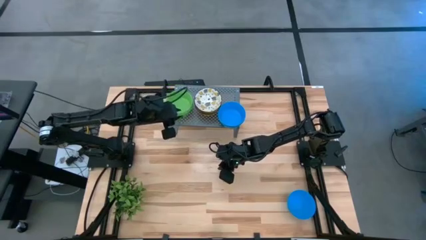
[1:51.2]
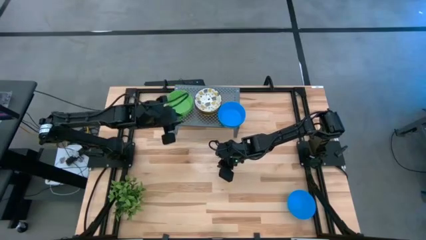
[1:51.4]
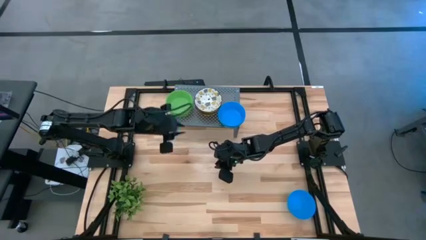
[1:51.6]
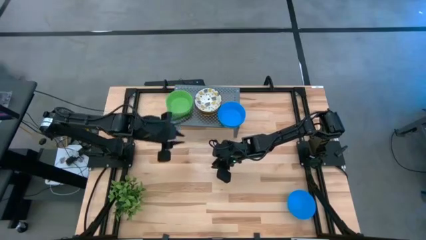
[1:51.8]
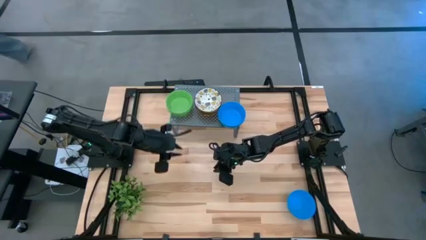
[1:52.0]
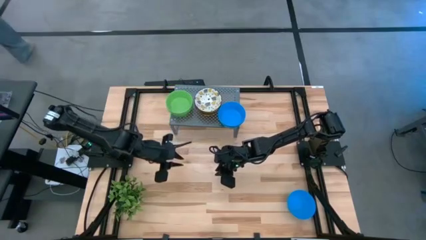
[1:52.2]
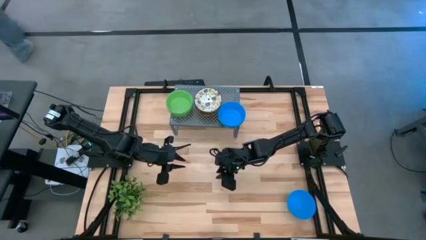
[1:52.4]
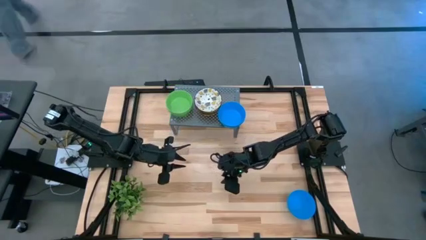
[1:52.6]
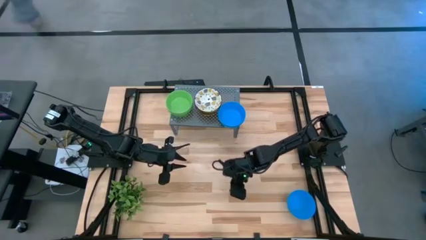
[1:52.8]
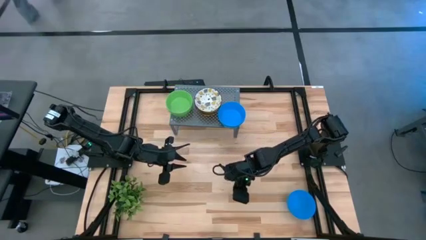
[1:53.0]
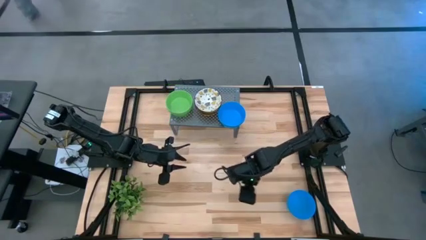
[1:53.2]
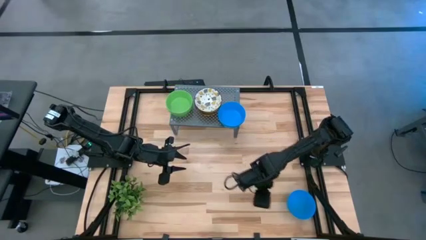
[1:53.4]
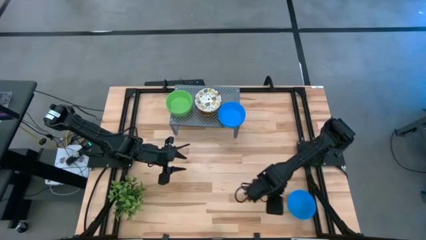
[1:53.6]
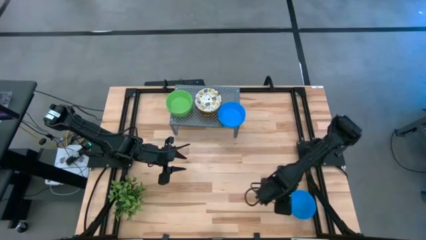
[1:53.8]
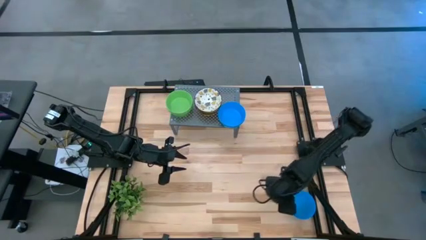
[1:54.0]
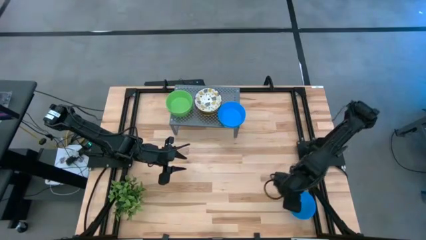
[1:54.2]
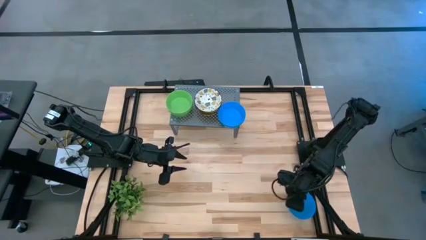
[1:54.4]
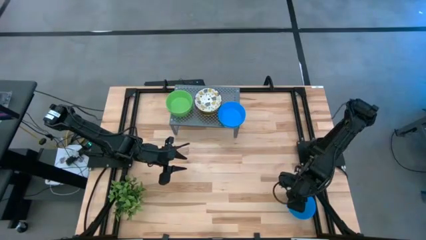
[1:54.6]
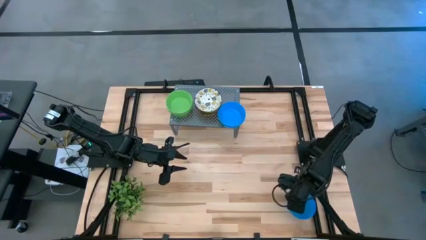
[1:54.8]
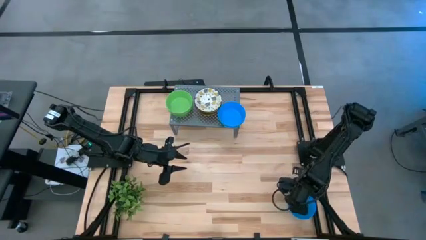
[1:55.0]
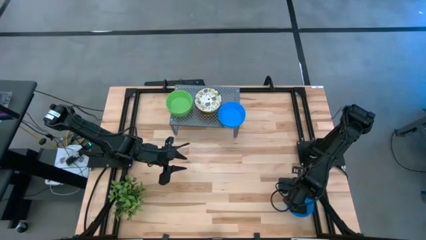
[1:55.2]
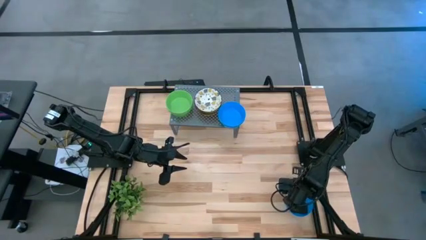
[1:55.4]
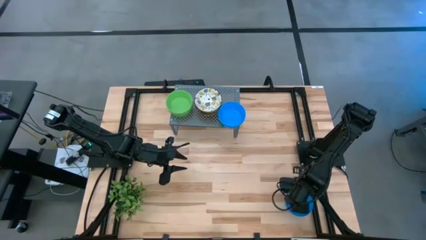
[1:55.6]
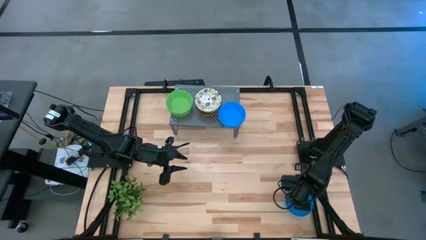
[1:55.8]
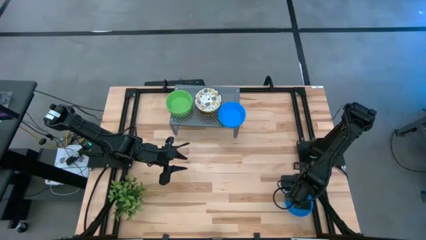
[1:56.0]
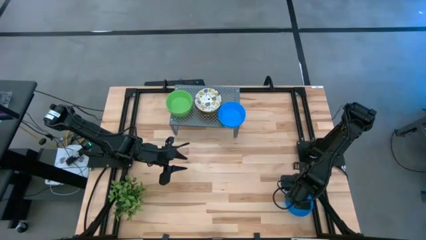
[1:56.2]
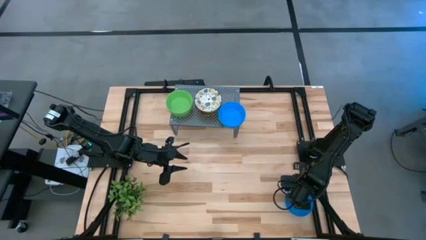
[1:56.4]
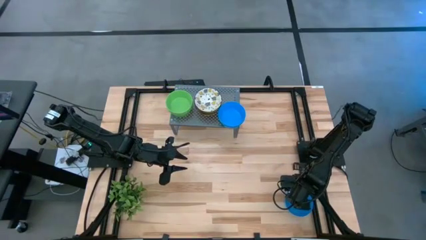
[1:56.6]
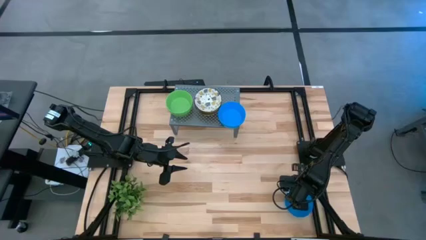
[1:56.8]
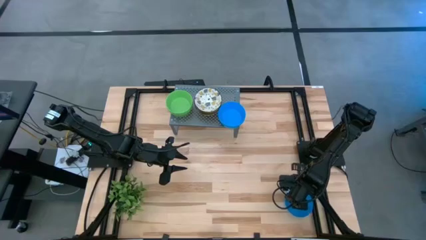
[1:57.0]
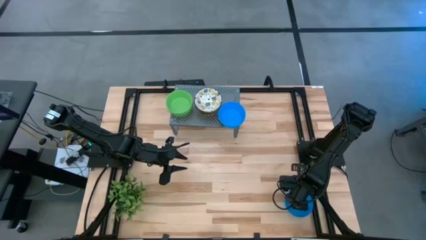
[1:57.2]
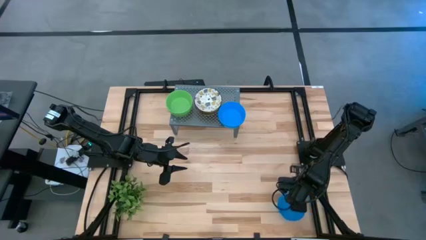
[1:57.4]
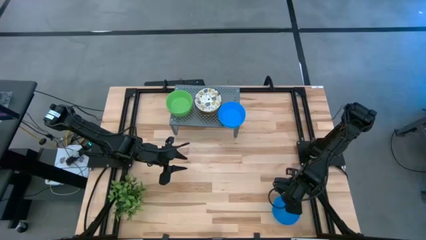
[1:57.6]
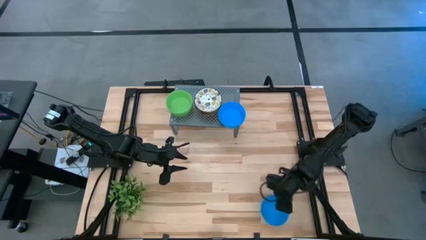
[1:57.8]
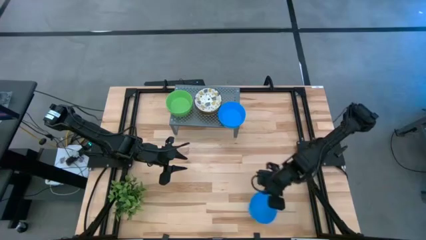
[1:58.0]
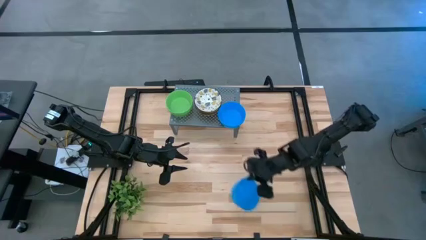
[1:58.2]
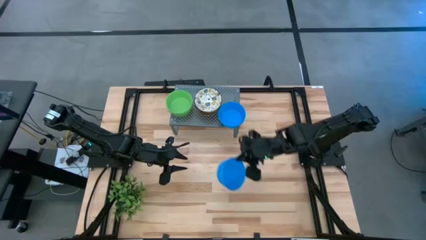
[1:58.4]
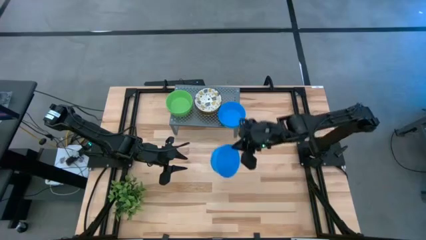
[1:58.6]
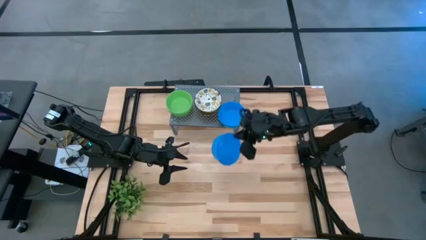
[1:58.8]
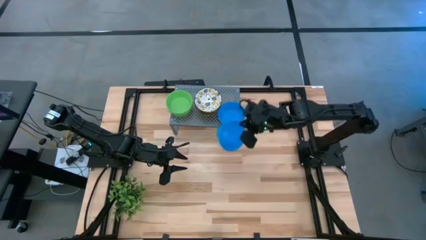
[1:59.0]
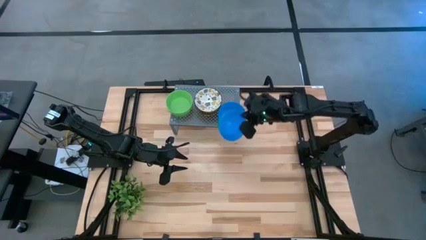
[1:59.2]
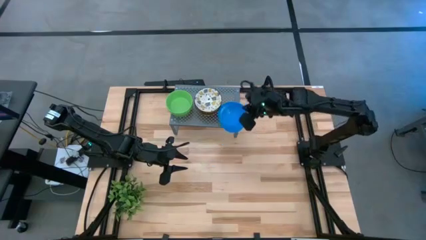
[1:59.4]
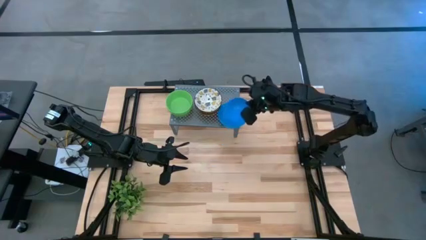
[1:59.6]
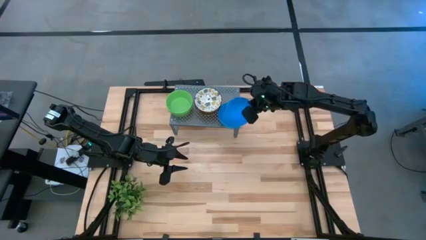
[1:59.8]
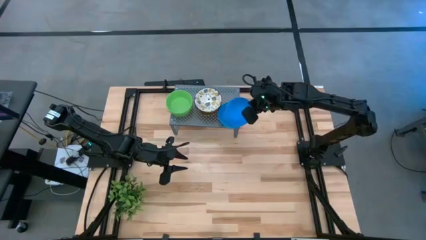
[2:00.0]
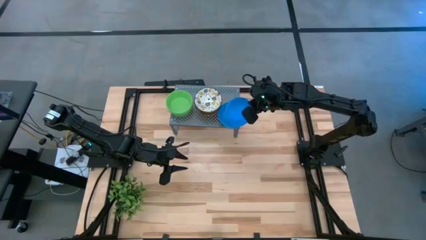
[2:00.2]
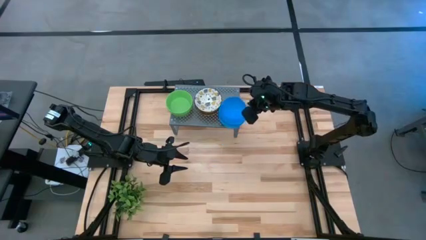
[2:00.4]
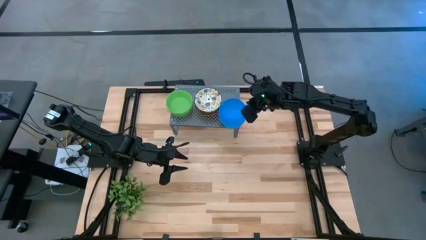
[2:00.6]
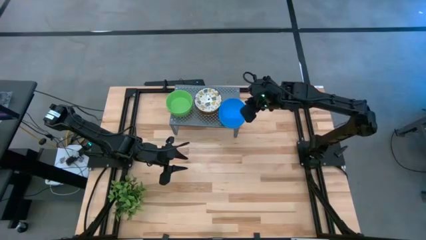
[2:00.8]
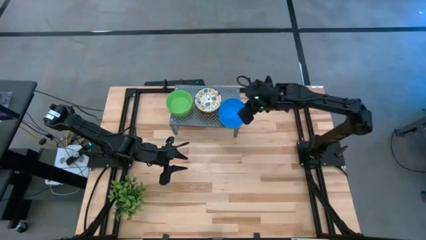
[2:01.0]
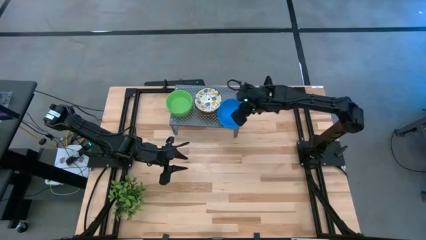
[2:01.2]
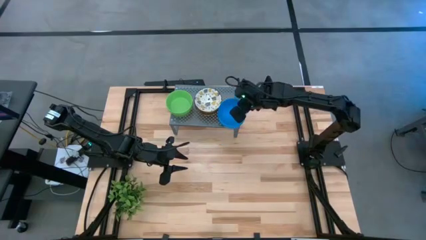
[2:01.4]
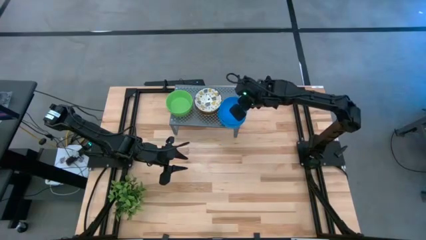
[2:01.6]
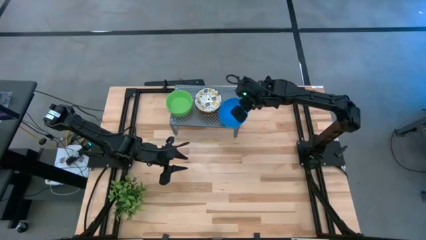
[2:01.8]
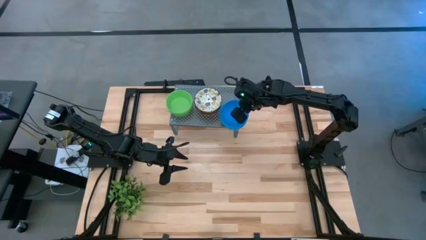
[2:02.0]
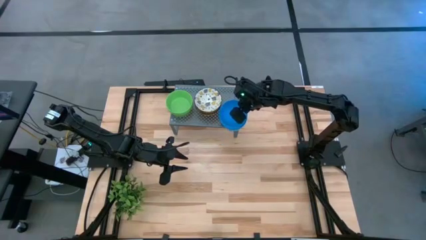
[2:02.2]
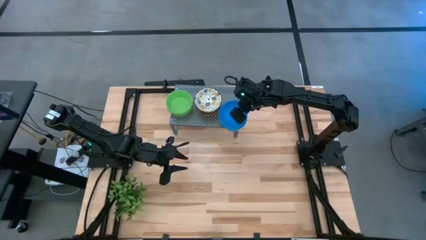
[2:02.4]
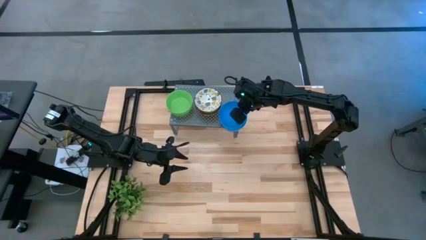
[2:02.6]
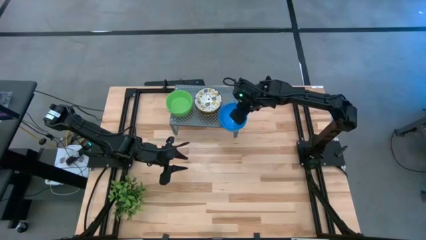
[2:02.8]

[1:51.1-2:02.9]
Task: Pick & Place Mini bowls
Stack the blue bowl on top of the other blue bowls on the shelf

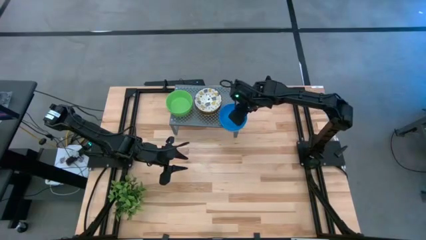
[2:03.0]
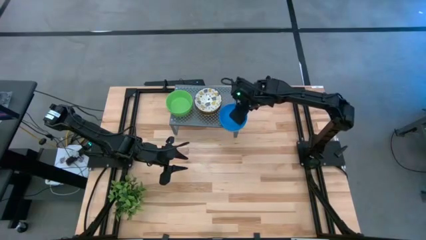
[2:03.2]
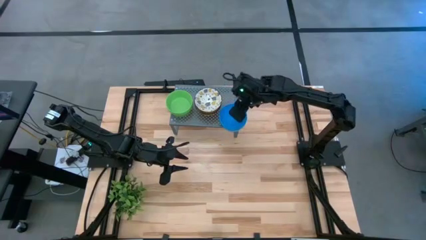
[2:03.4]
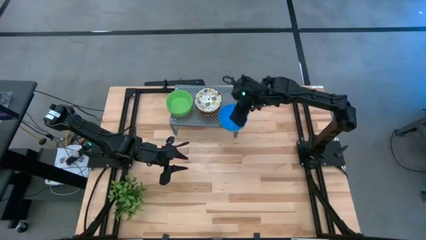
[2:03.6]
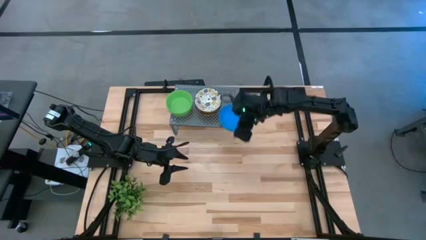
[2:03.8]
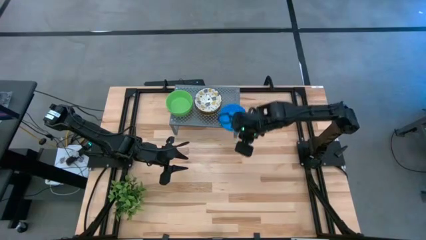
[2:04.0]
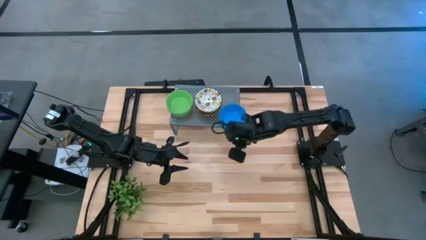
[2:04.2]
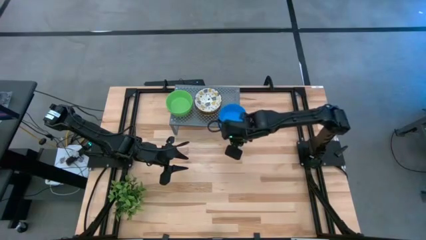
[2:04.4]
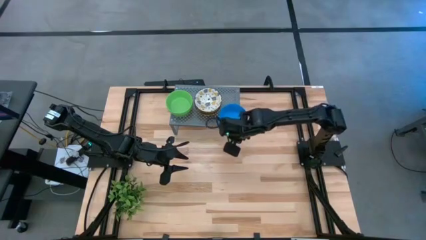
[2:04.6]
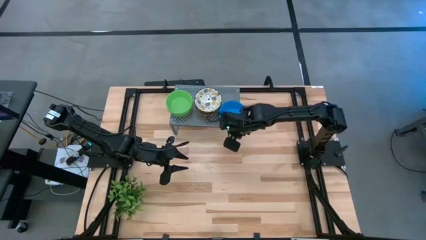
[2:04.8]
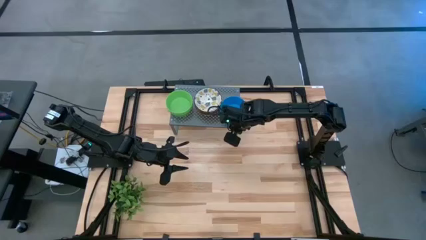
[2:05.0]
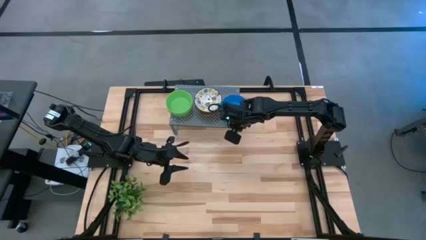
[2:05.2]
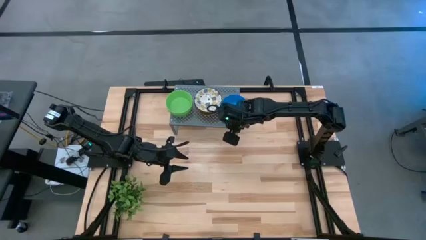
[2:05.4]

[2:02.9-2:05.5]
Adjust the stacked blue bowls on the shelf
